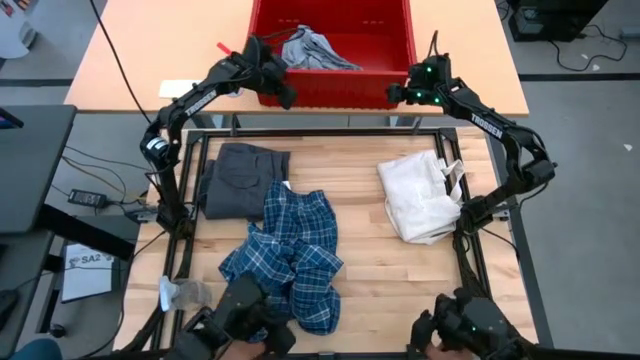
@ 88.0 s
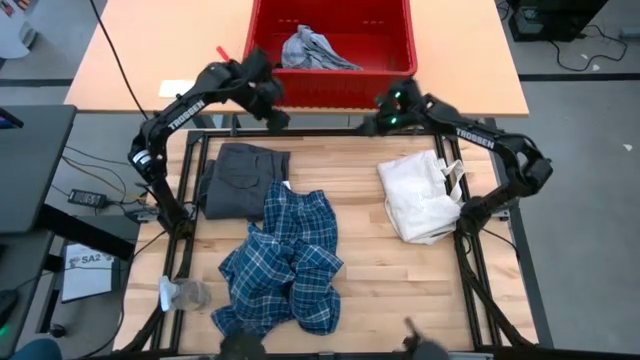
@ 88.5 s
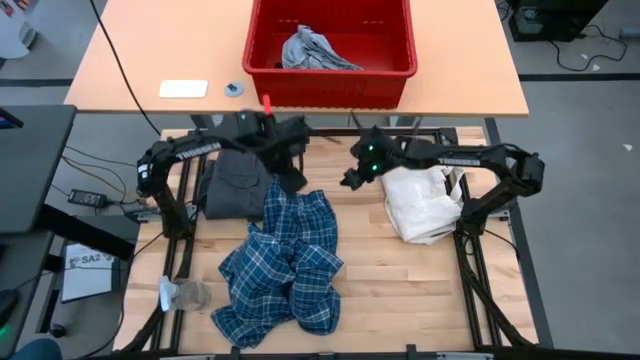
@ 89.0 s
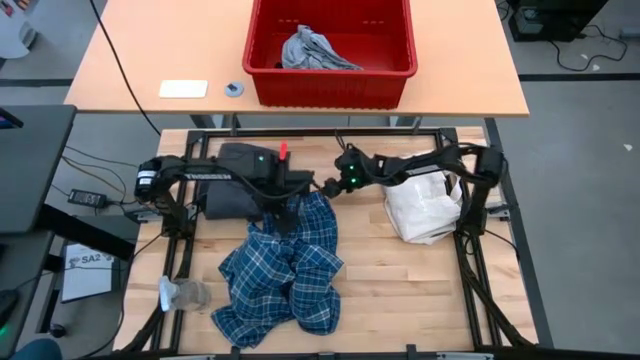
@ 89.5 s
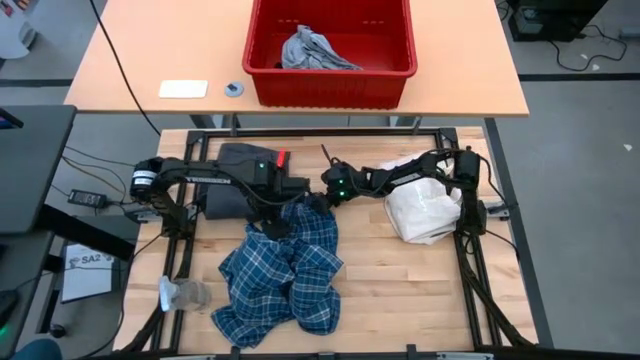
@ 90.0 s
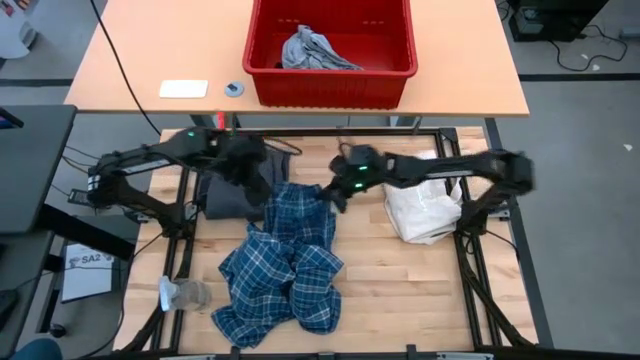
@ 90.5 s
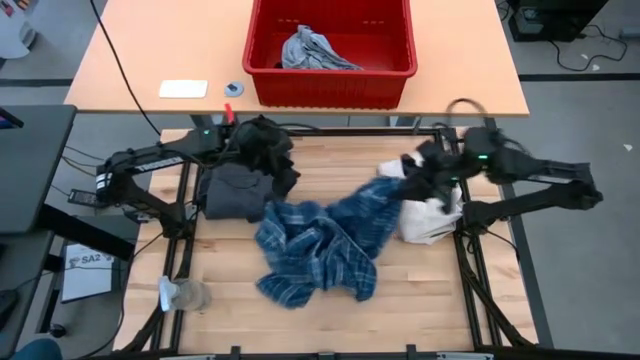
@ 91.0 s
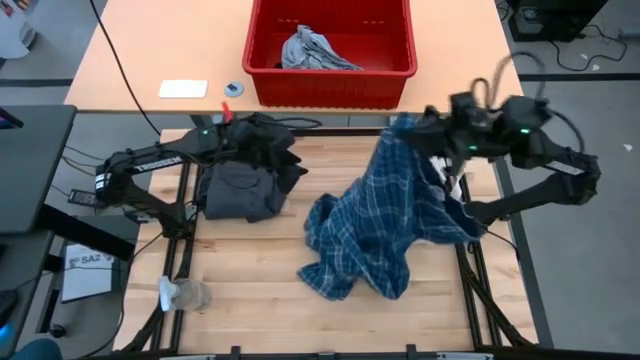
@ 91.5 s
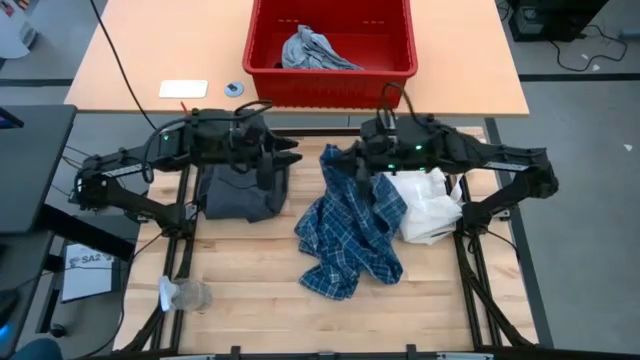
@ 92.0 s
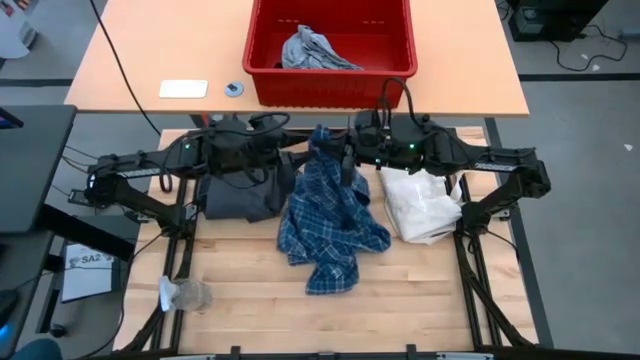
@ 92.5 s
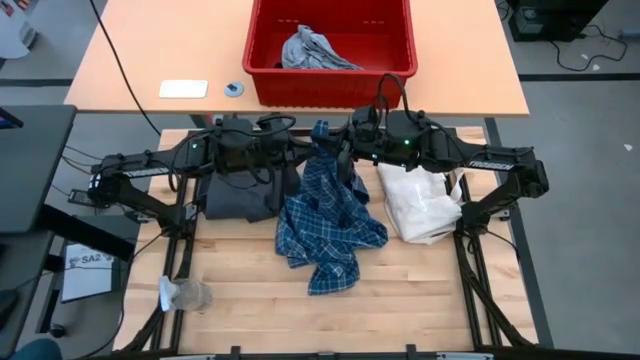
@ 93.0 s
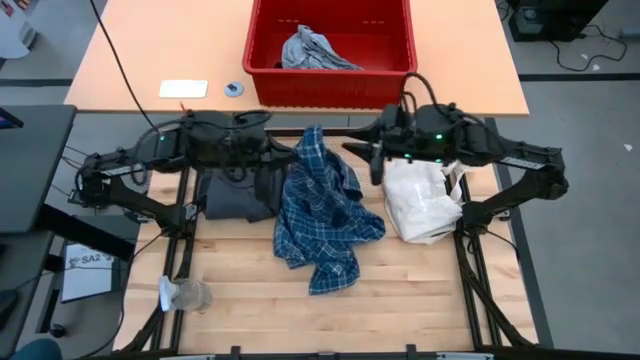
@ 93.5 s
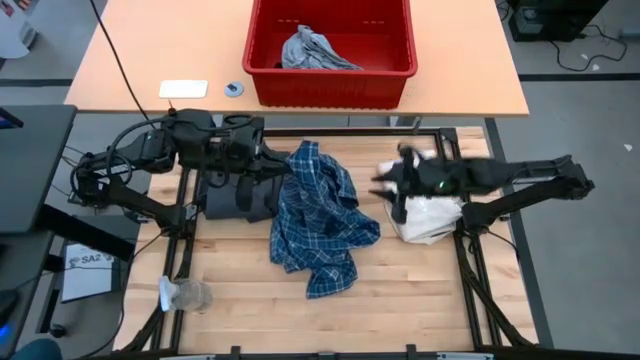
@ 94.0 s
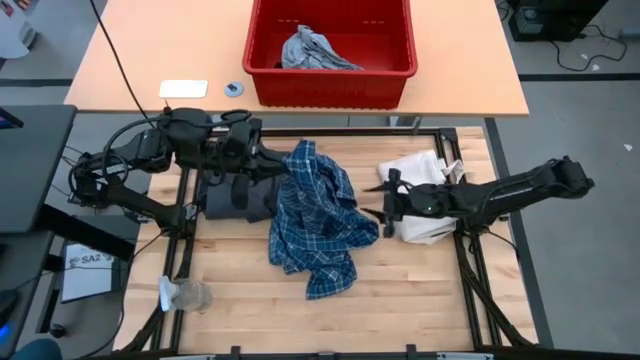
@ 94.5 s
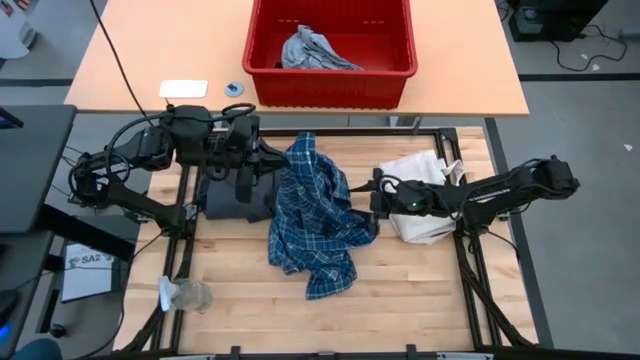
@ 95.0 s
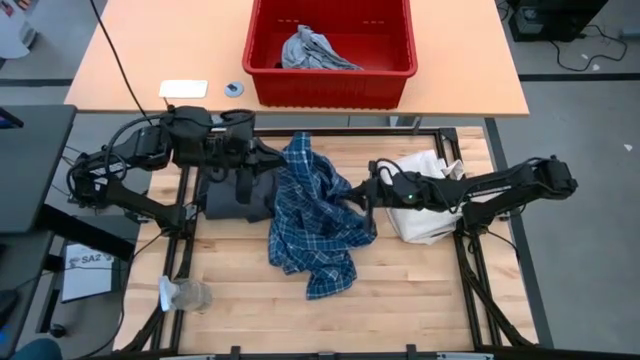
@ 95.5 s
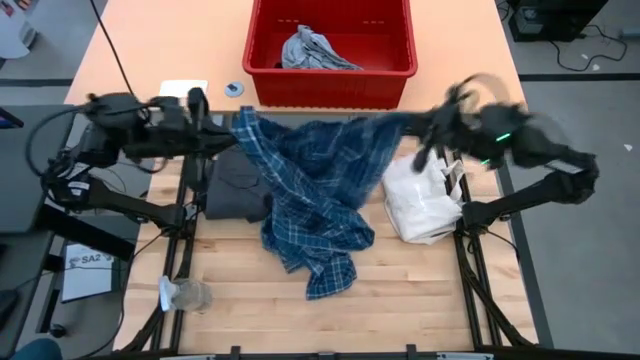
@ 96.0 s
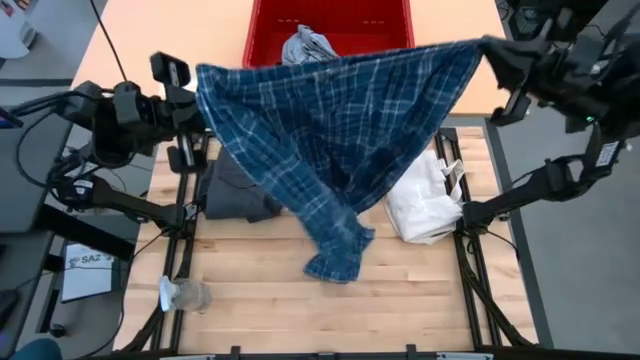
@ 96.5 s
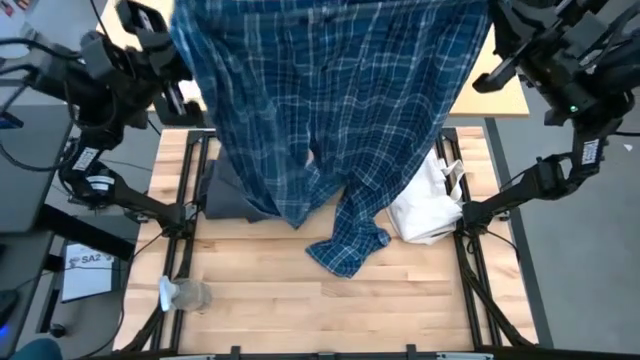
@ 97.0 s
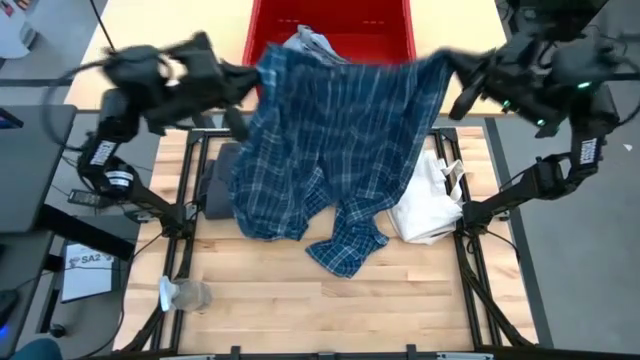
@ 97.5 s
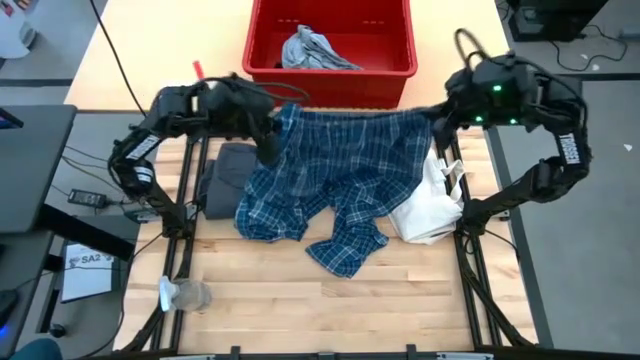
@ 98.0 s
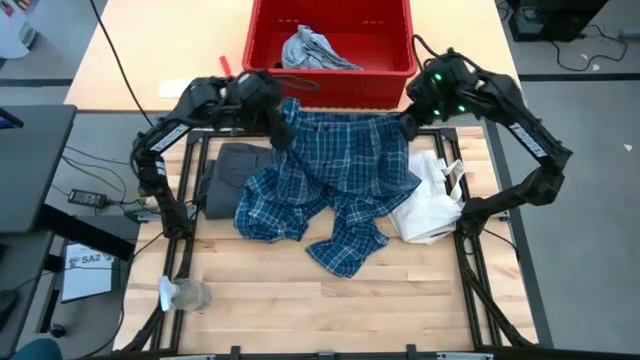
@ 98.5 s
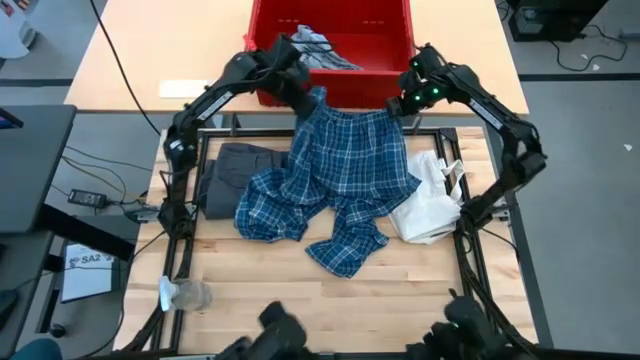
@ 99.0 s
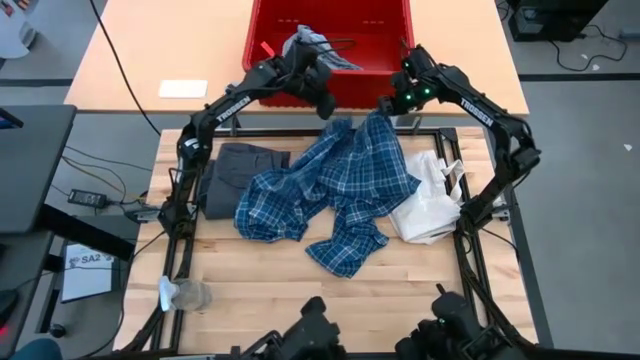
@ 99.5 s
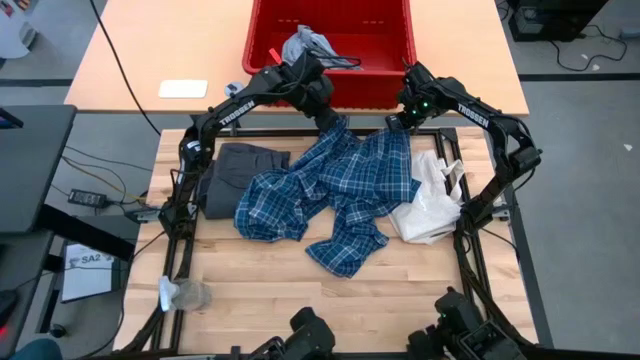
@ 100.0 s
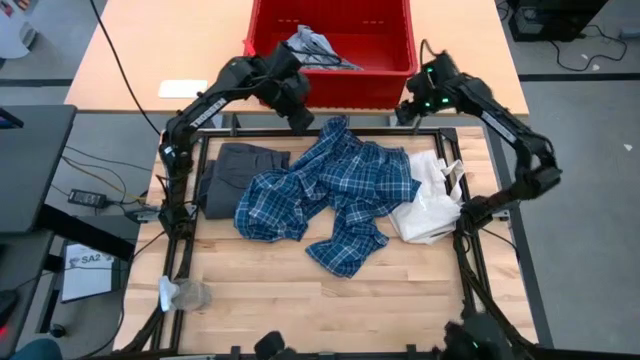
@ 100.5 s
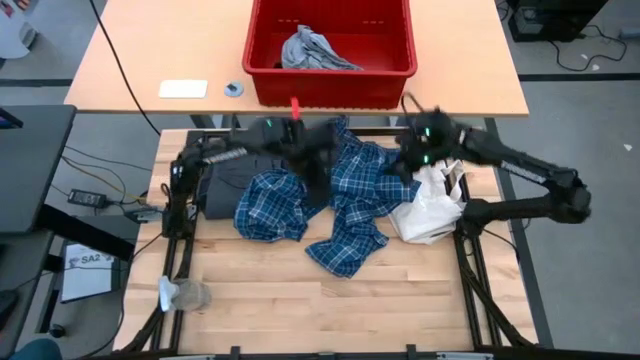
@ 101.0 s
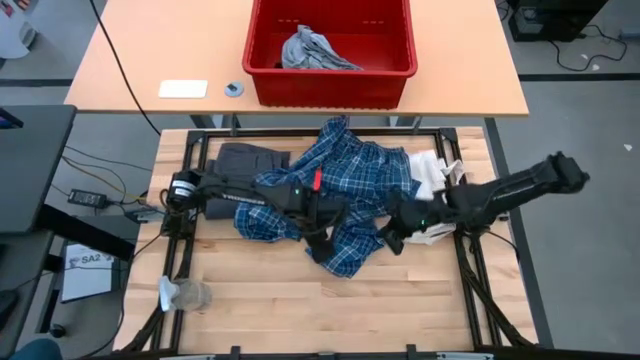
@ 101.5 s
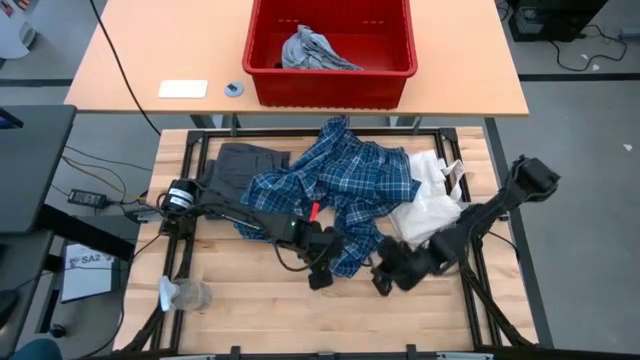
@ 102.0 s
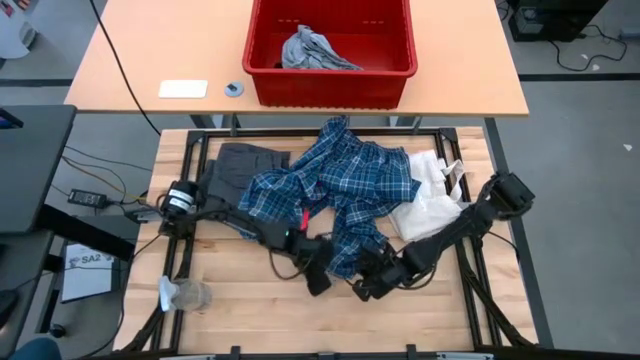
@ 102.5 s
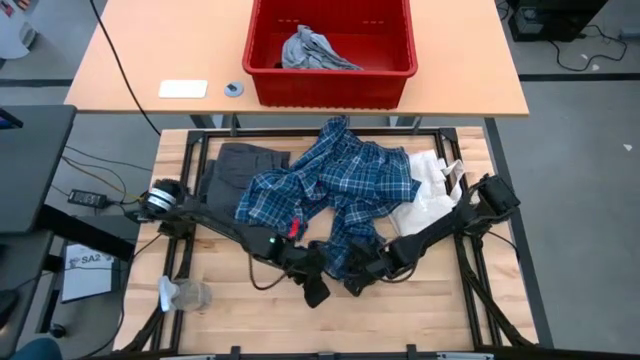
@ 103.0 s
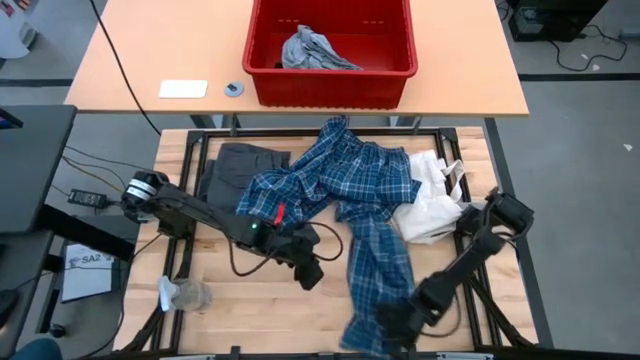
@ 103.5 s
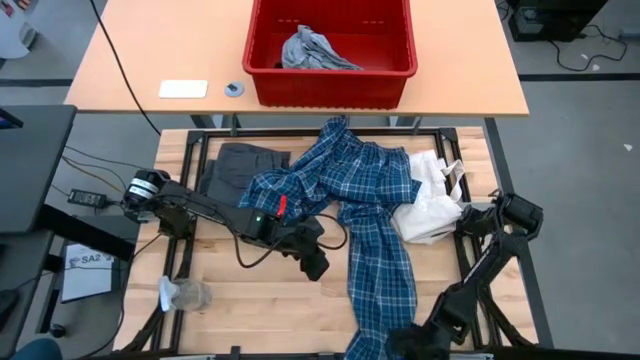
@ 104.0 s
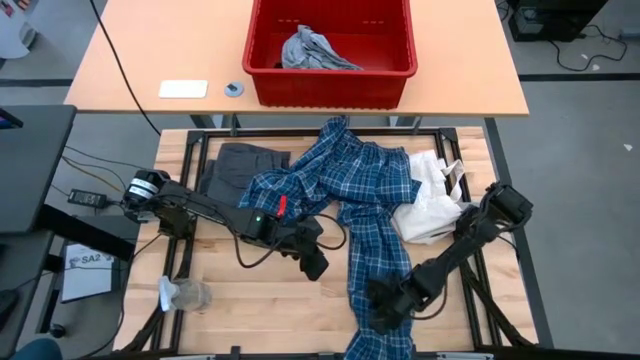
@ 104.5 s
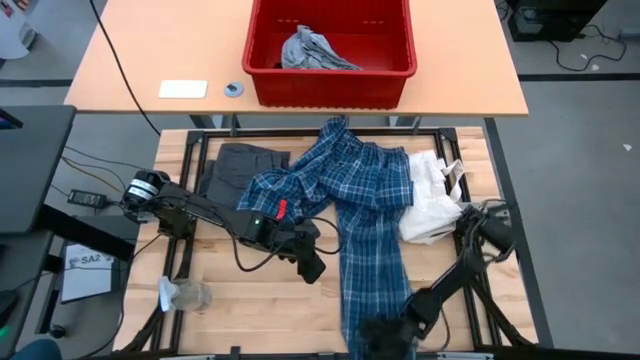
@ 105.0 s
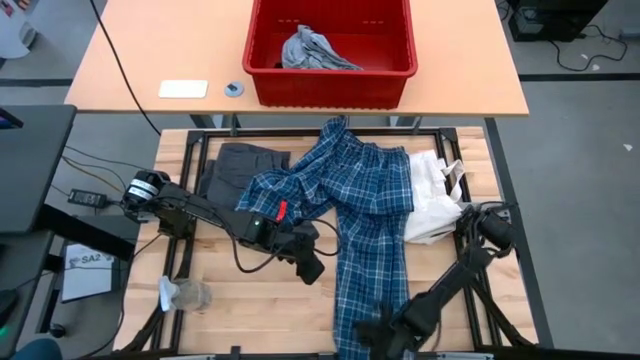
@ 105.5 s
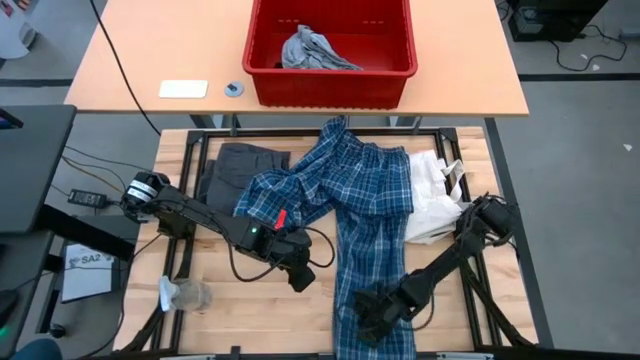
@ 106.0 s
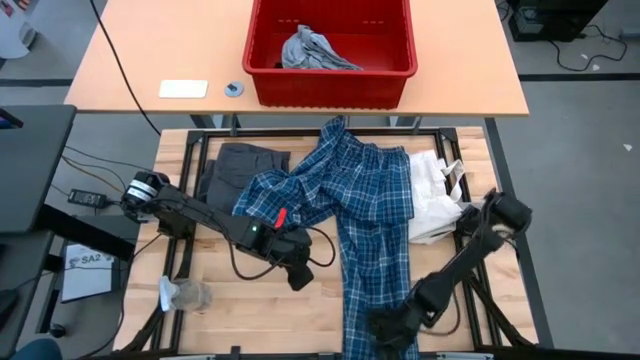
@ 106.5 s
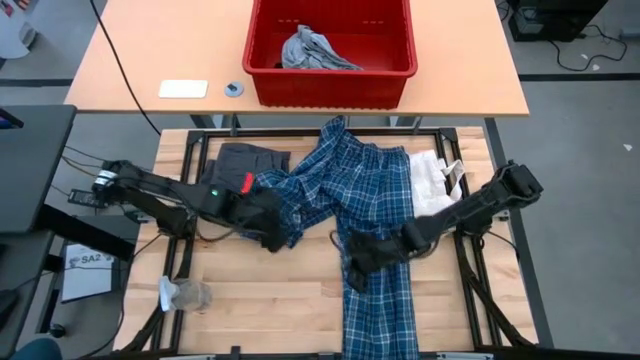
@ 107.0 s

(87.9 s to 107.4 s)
Task: Fold Laundry from Bin
Fold the plaid pants

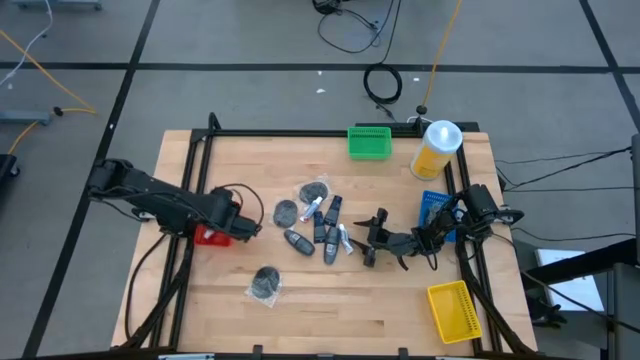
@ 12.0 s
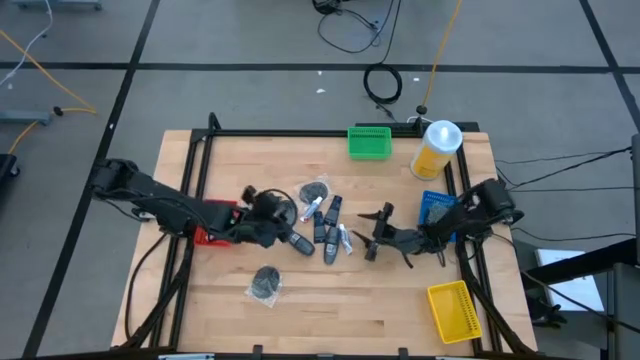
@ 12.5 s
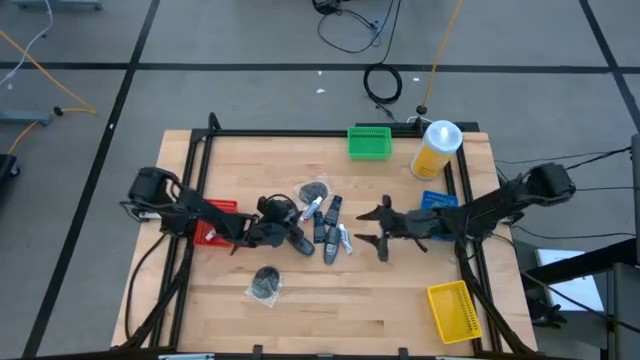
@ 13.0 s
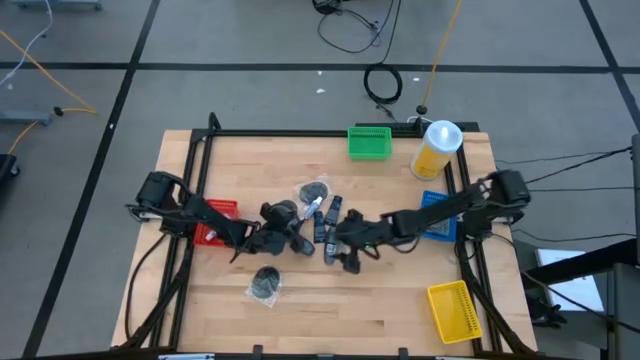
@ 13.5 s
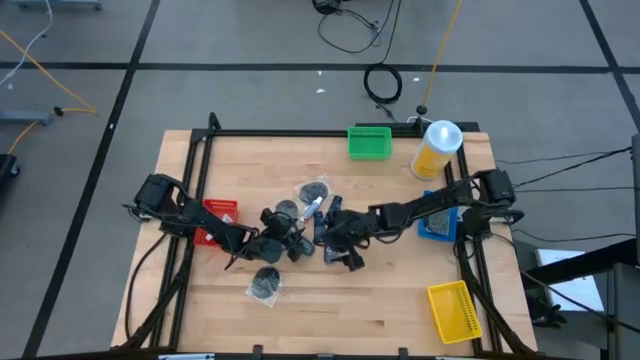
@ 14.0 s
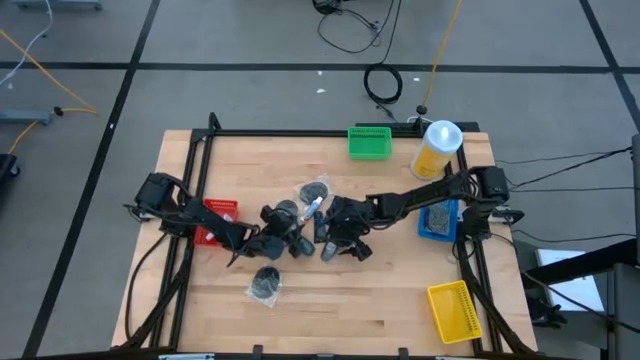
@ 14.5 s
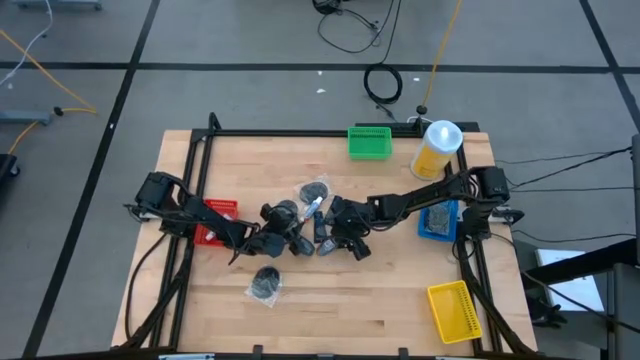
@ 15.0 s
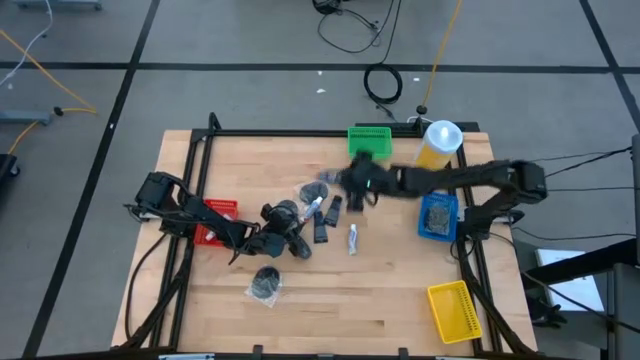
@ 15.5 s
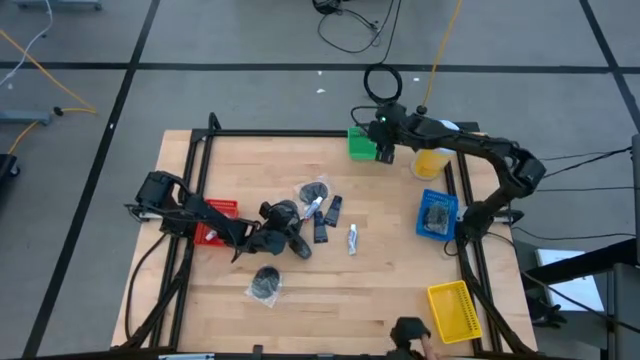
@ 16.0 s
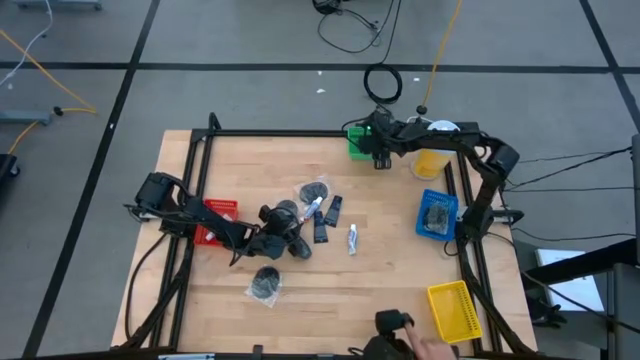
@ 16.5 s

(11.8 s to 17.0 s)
Task: Pick & Place Travel size toiletries
Put the gray deodorant into the green bin
